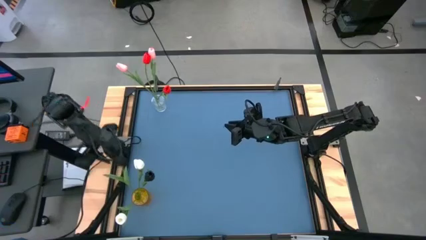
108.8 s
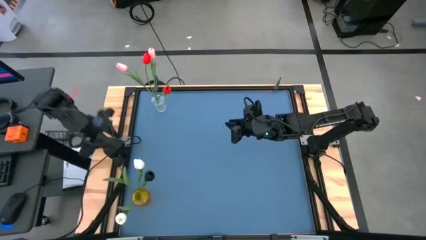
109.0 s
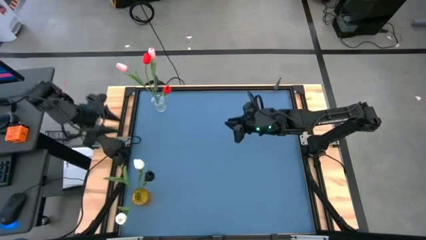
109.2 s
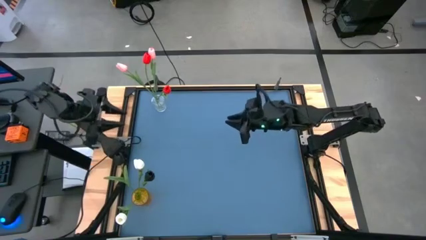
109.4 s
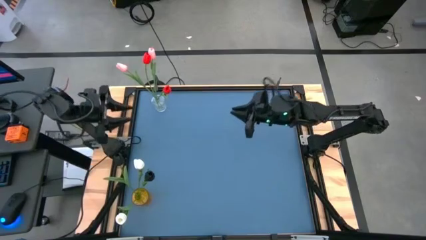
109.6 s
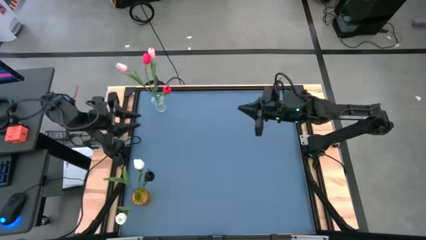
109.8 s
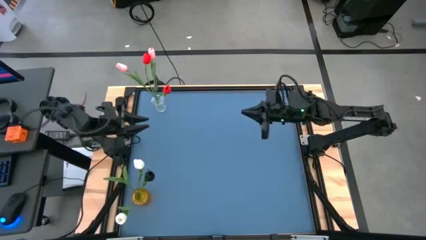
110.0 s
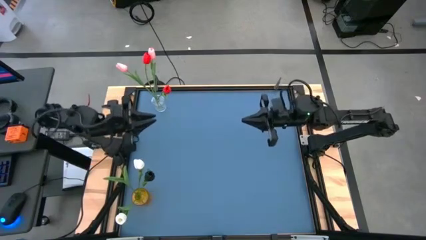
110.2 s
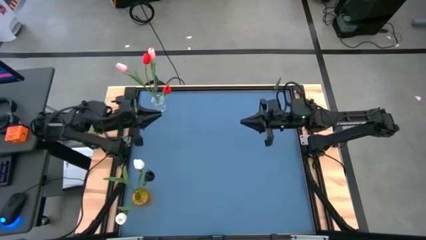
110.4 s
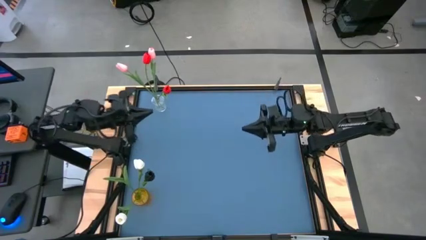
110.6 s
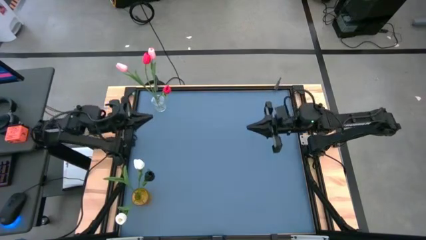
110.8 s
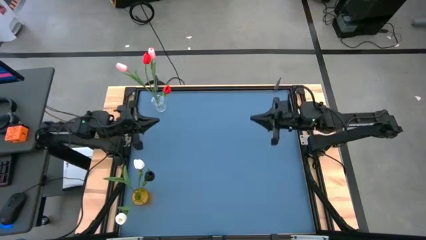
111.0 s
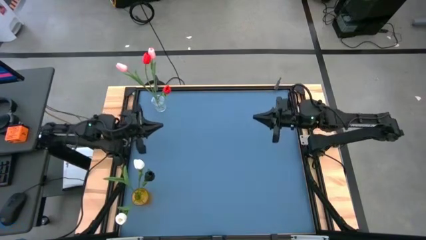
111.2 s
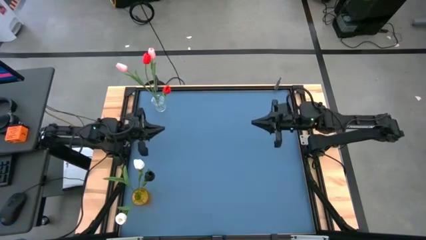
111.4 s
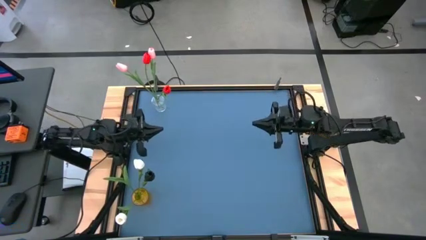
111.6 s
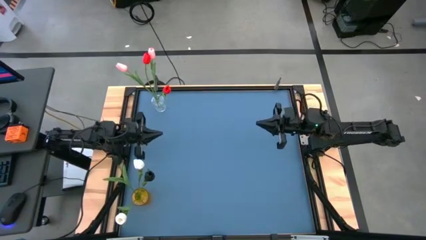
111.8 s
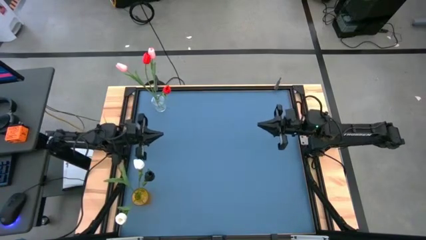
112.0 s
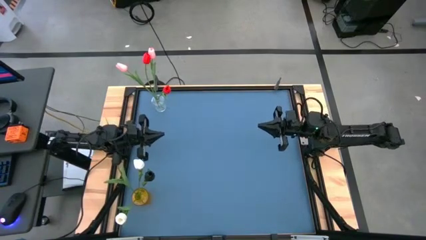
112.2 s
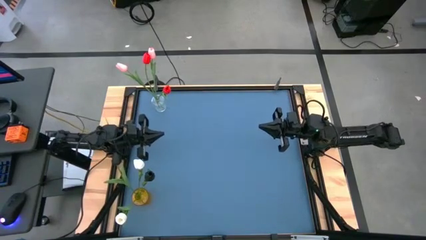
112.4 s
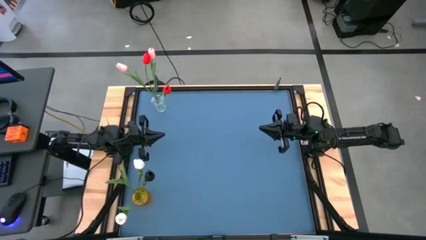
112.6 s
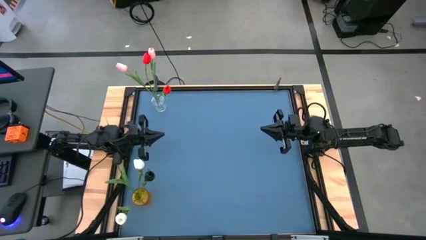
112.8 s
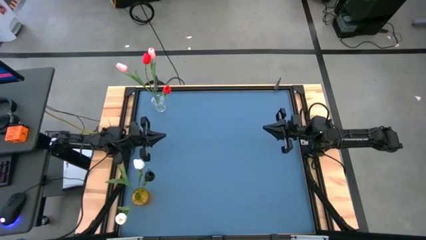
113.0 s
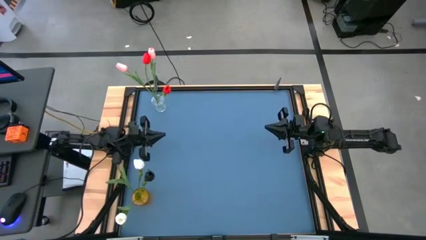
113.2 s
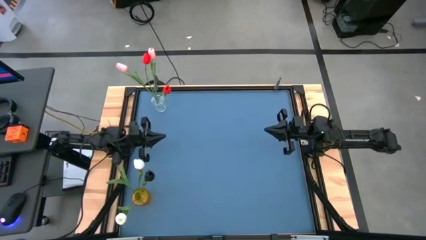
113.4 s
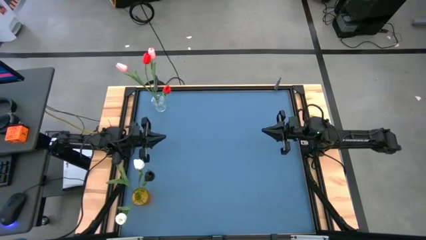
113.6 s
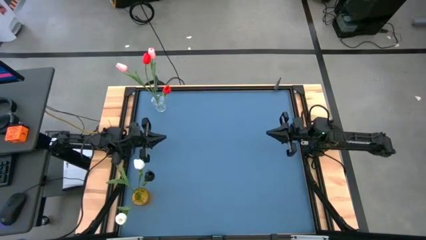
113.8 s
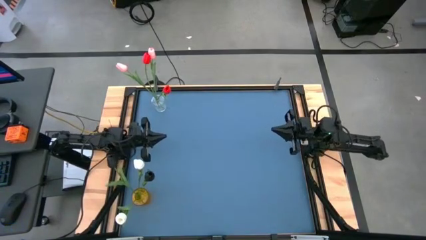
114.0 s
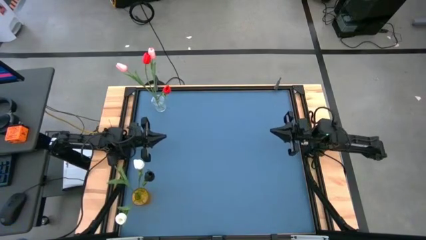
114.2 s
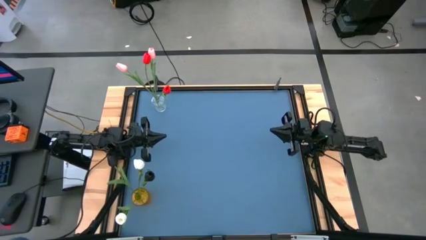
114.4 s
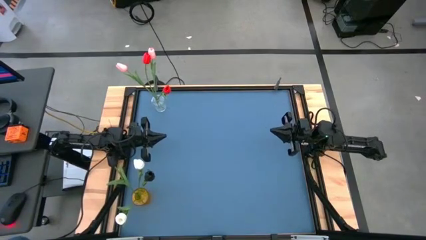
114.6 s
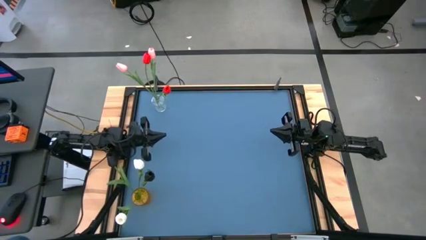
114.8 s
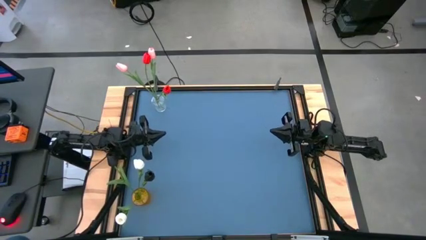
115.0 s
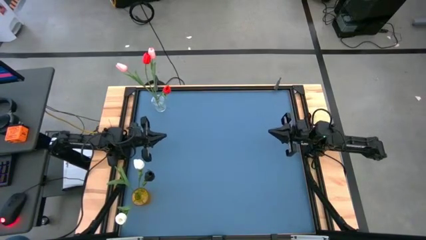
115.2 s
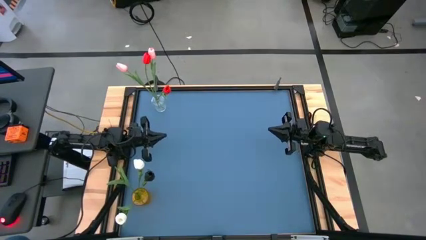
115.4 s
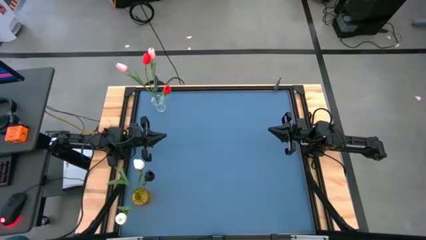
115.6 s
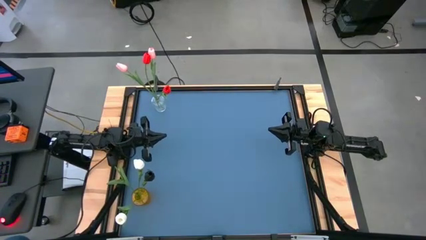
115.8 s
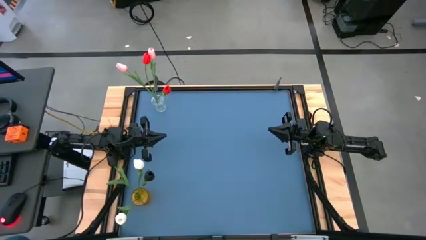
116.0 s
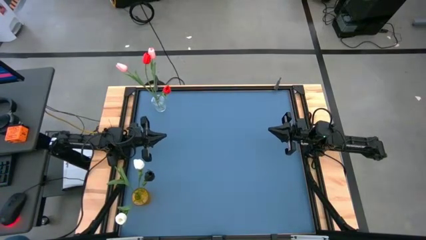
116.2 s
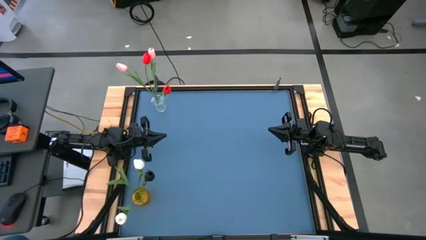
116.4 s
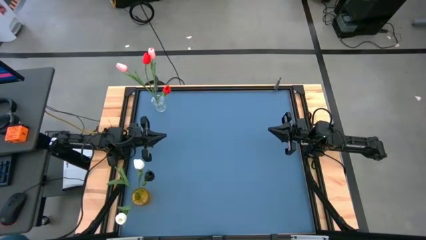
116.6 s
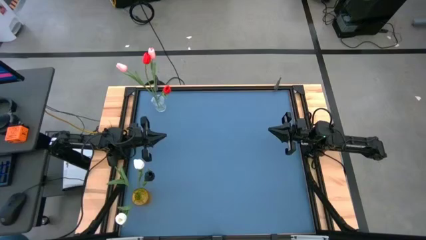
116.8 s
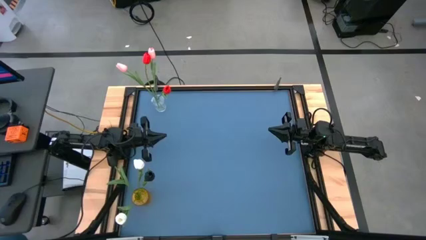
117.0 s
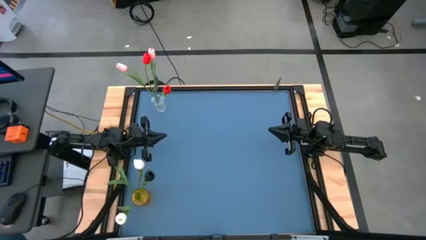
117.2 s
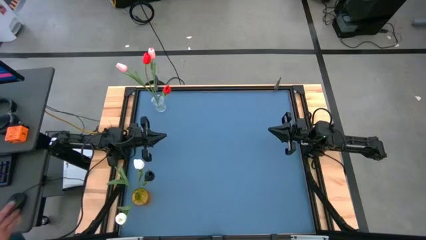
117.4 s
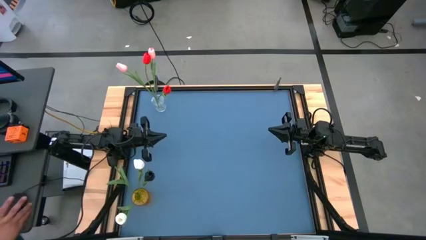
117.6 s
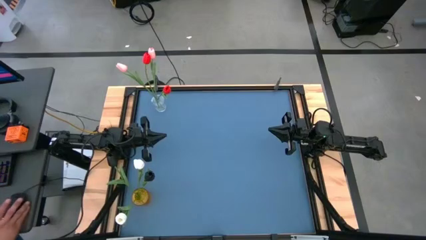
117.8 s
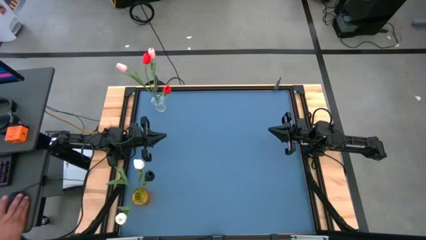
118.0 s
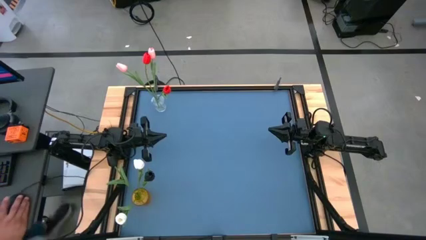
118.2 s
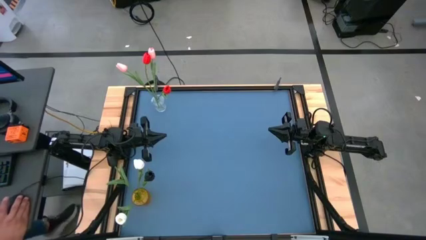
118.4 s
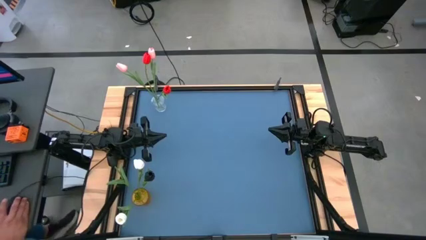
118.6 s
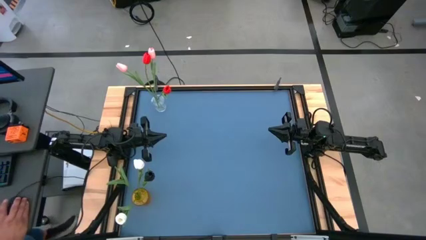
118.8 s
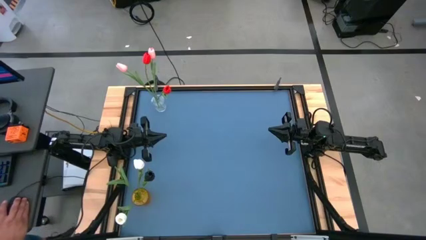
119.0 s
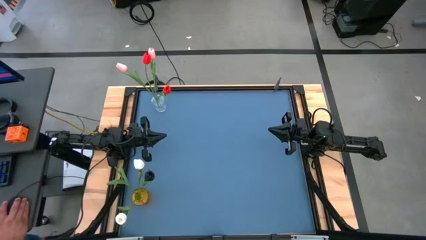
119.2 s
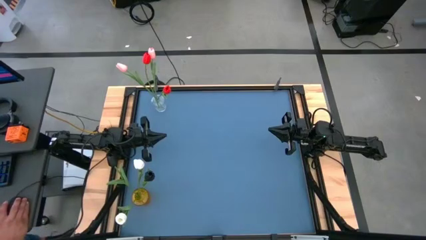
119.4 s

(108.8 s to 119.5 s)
Task: Sort flowers into vase by color
Return to Home Position
